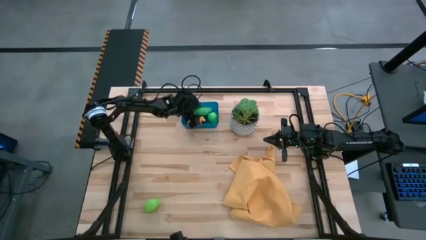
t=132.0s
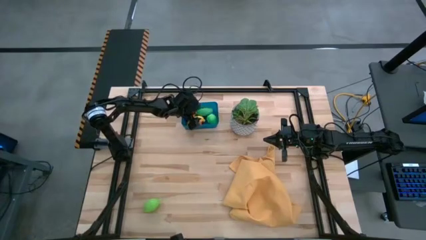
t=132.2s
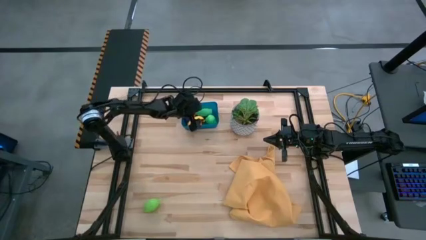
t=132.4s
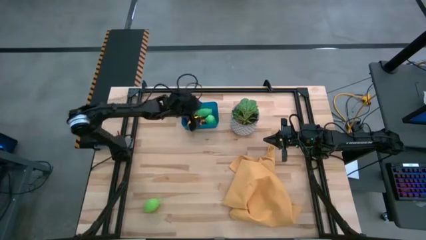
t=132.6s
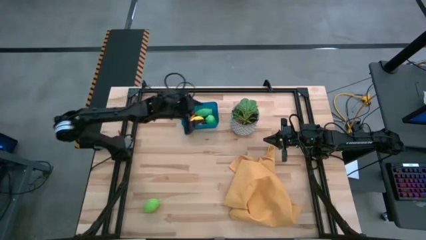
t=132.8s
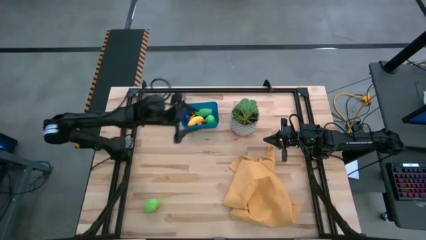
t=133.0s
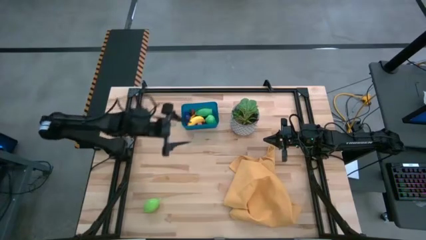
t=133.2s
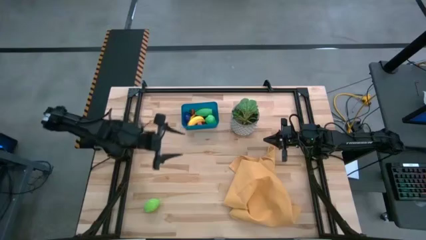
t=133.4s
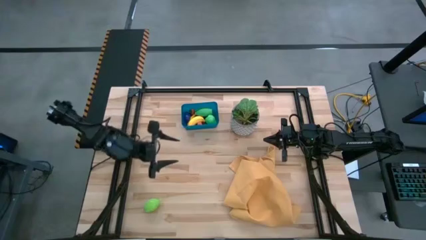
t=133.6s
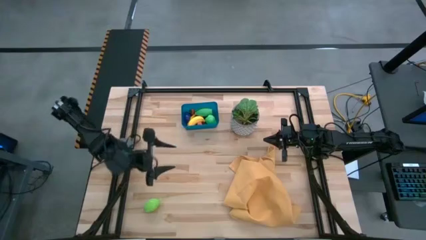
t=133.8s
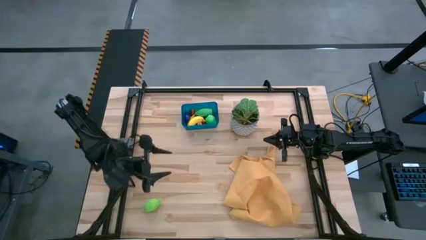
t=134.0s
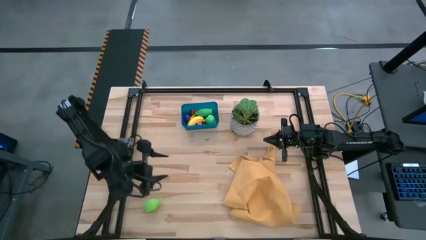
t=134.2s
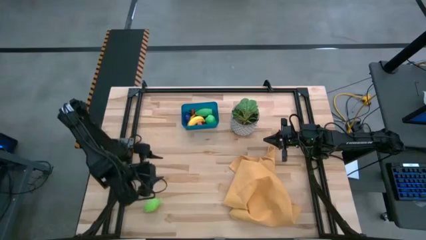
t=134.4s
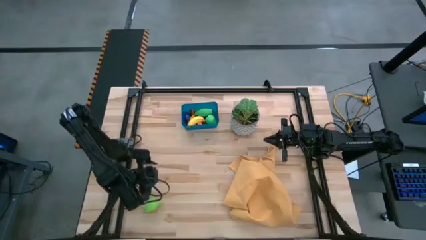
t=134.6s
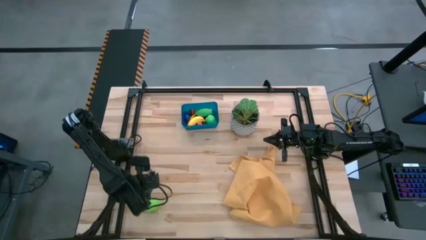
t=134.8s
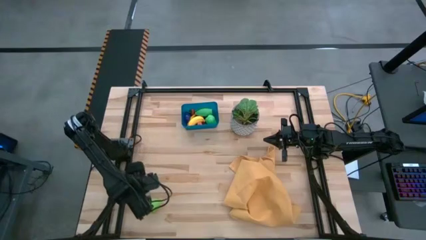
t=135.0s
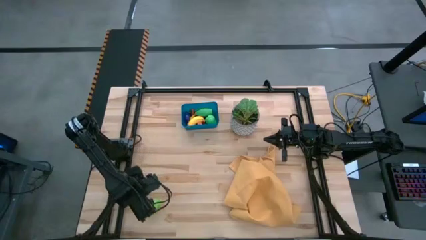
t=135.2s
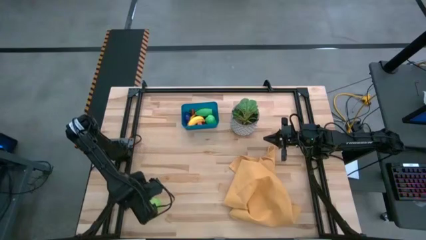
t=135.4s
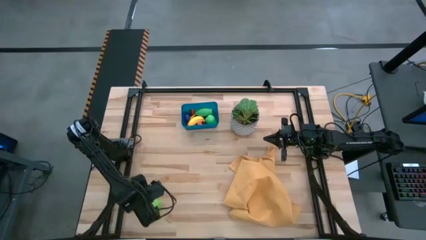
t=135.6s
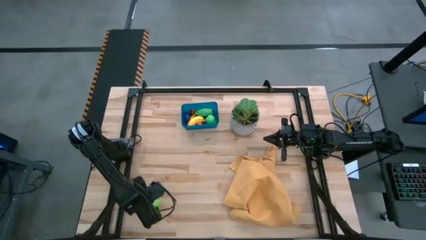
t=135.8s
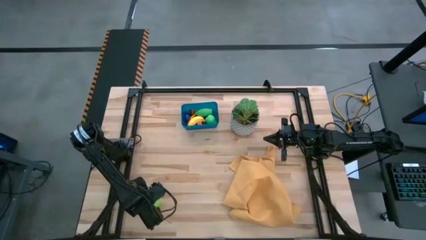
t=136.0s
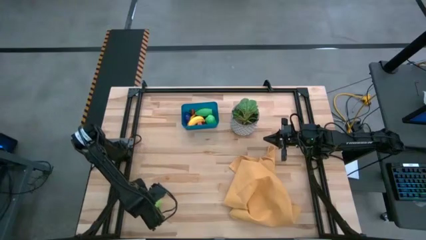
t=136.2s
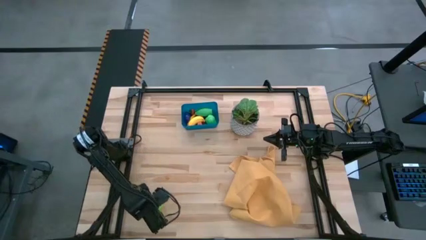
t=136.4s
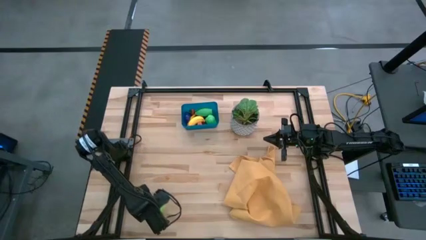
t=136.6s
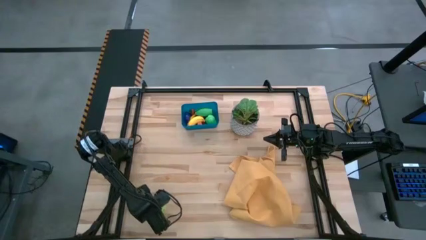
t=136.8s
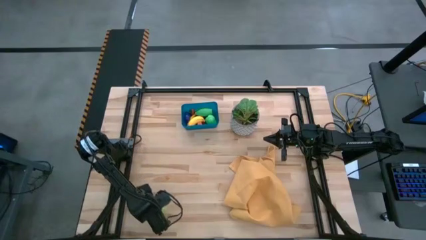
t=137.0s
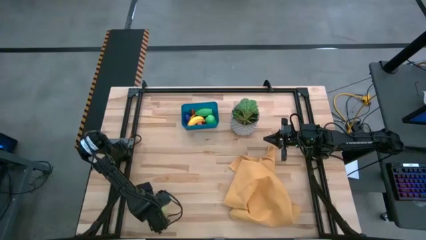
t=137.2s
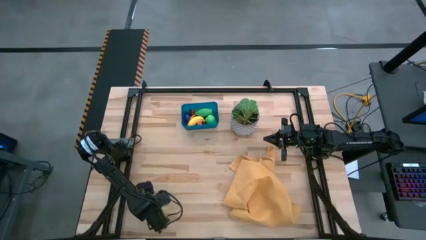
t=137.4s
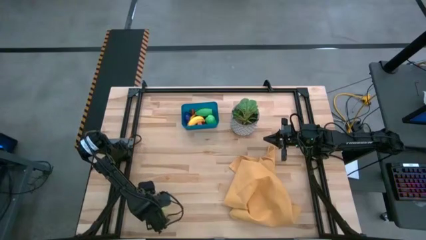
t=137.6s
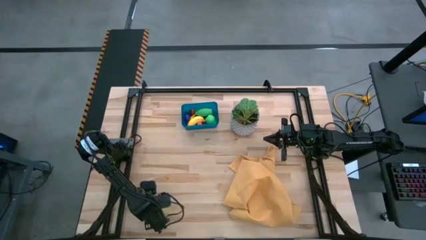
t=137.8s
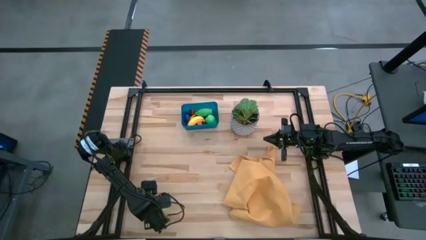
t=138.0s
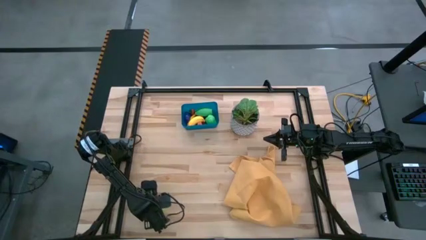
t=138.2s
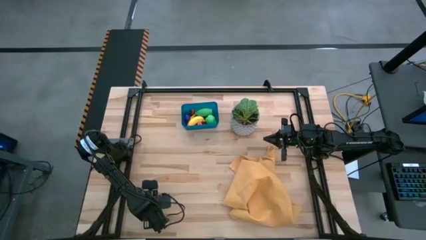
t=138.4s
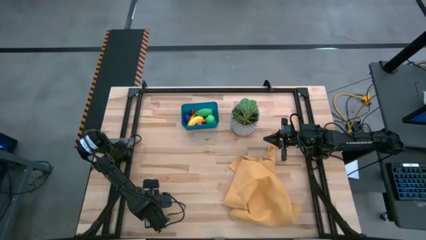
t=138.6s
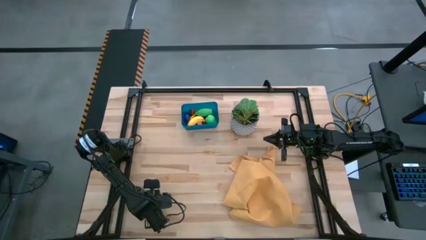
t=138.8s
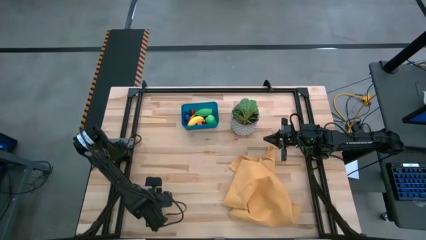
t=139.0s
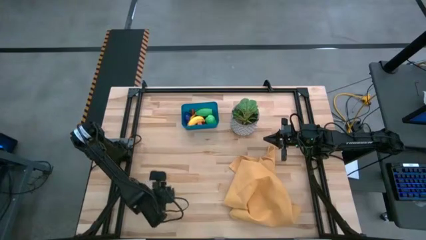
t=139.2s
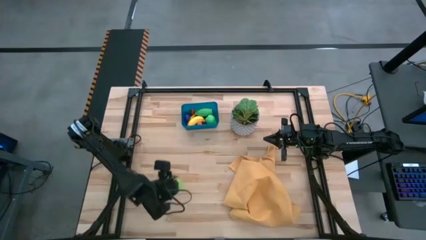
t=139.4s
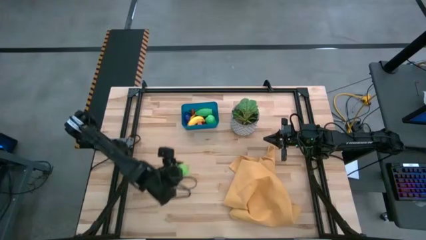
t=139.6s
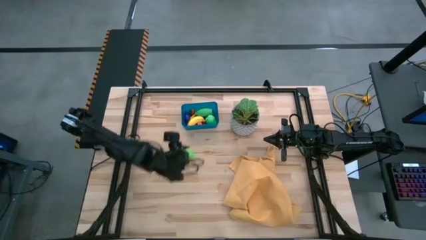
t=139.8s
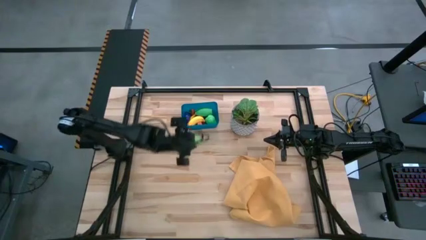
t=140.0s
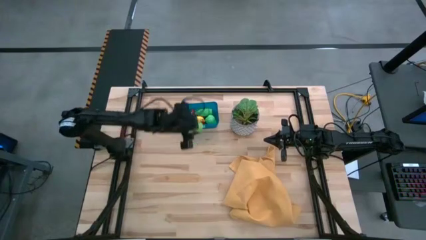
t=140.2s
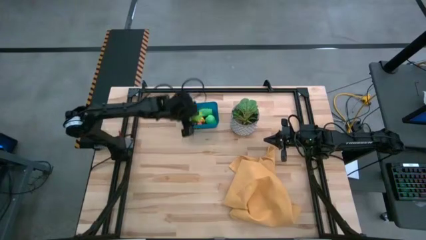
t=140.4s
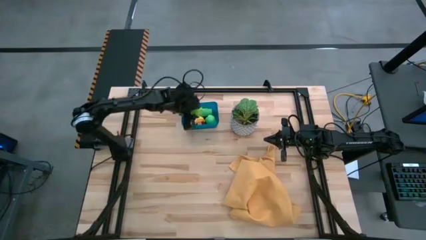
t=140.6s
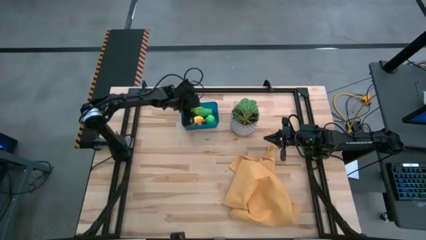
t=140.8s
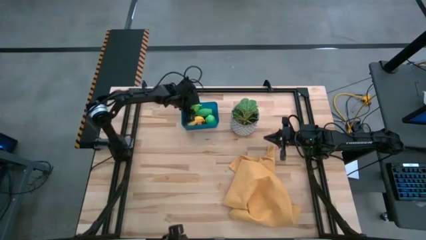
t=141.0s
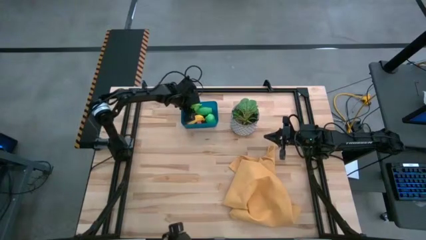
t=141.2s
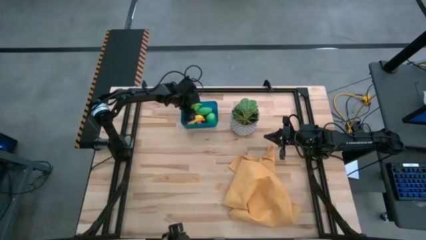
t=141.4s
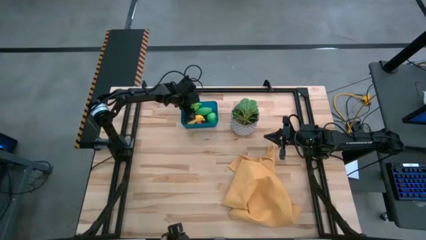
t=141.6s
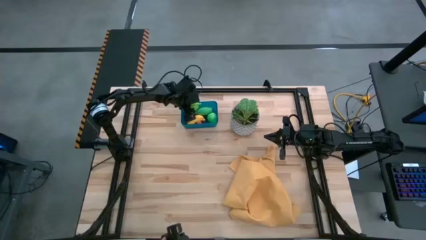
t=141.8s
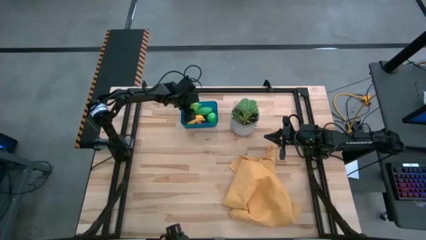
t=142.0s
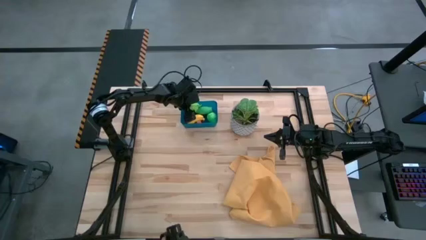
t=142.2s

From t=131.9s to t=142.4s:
Task: Pick and placing Produce into tupperware
Put the green melon into the blue bin

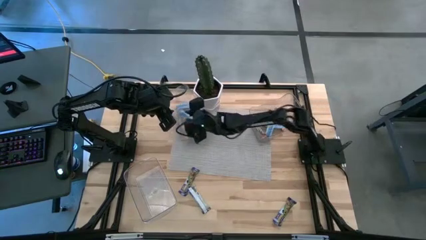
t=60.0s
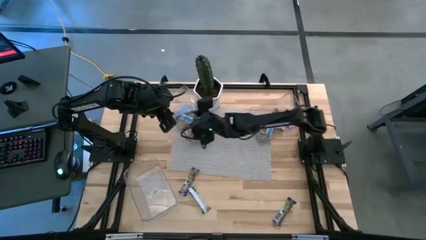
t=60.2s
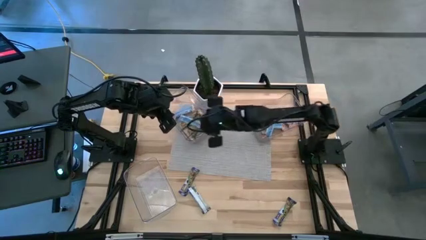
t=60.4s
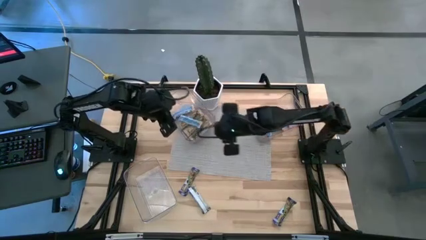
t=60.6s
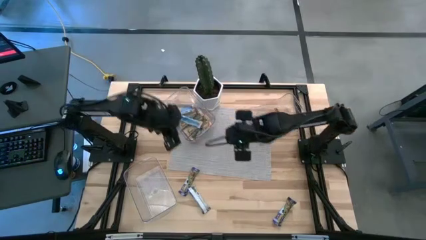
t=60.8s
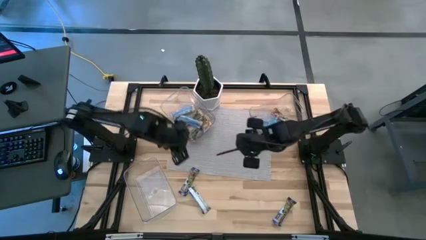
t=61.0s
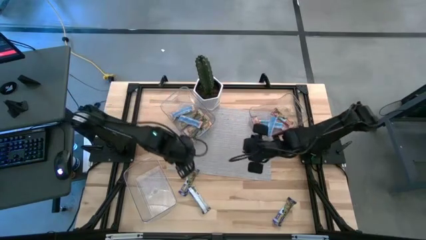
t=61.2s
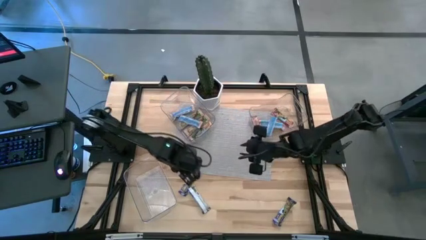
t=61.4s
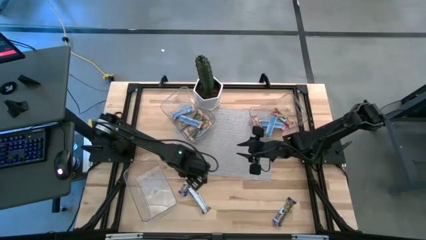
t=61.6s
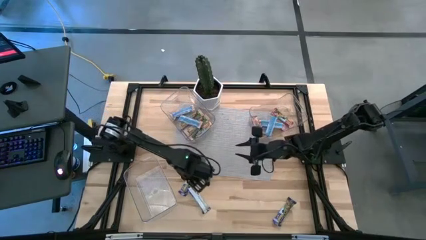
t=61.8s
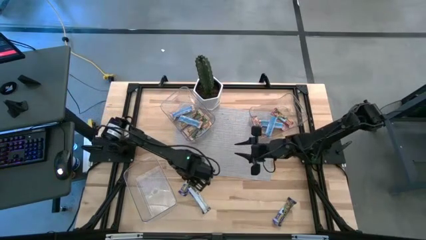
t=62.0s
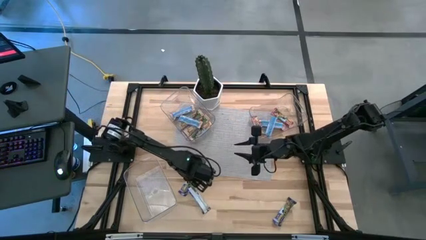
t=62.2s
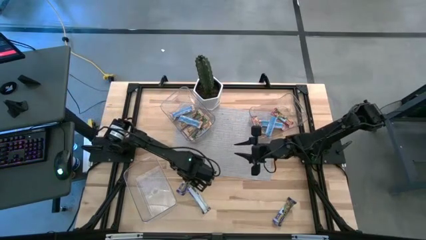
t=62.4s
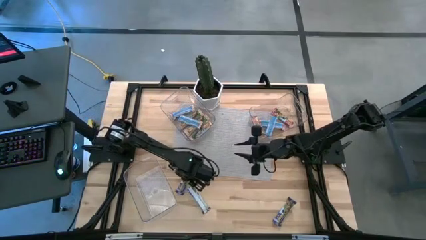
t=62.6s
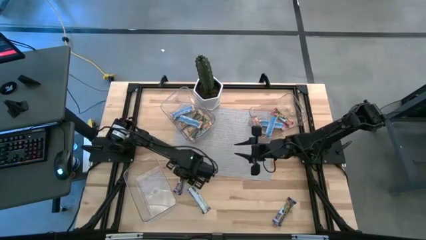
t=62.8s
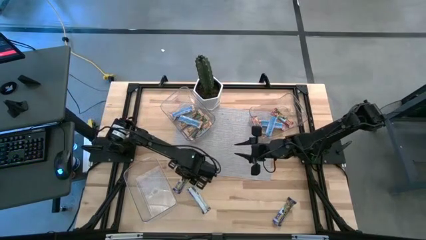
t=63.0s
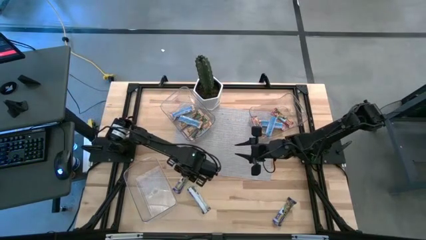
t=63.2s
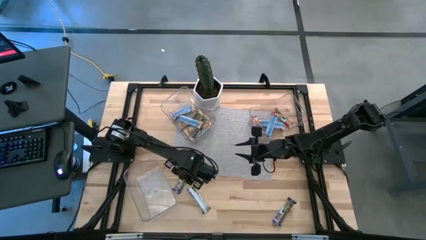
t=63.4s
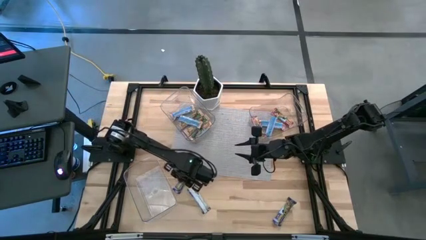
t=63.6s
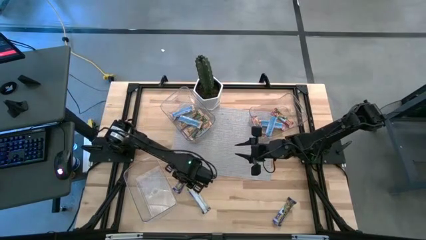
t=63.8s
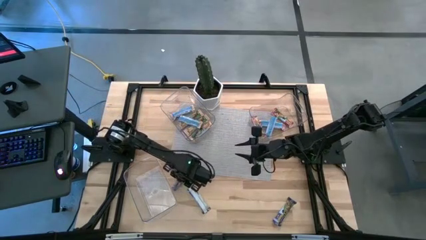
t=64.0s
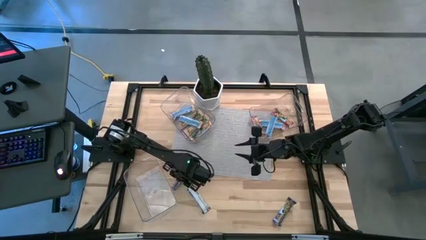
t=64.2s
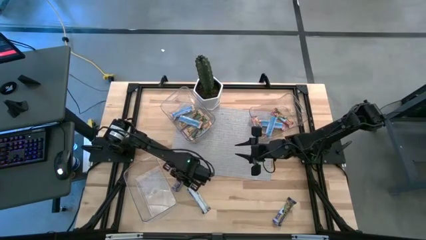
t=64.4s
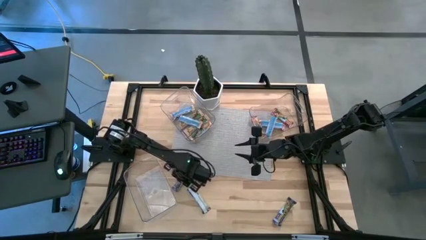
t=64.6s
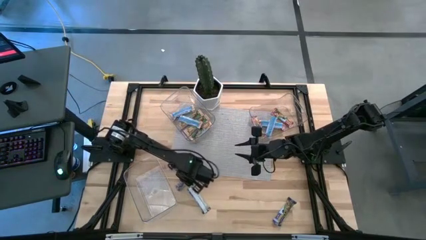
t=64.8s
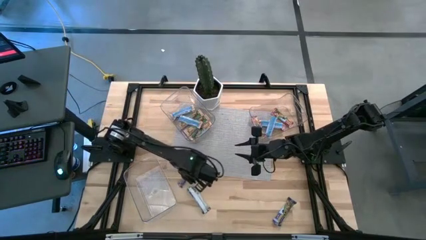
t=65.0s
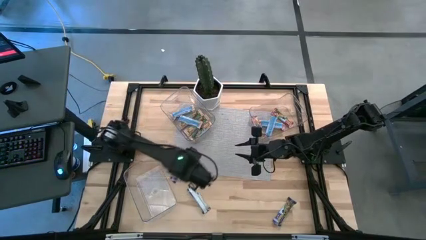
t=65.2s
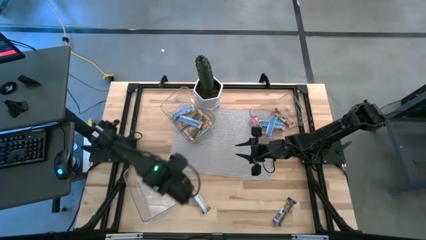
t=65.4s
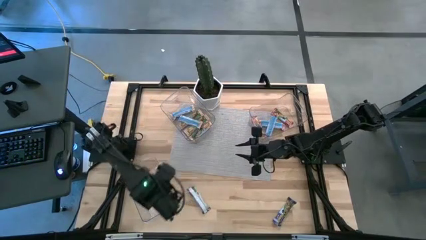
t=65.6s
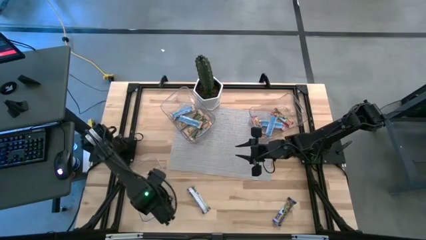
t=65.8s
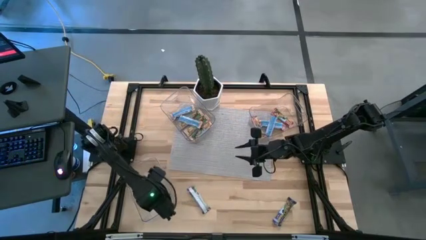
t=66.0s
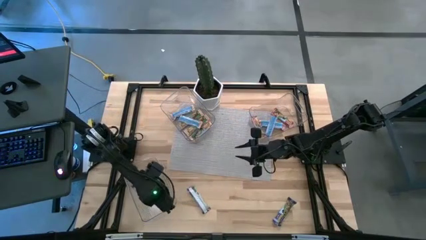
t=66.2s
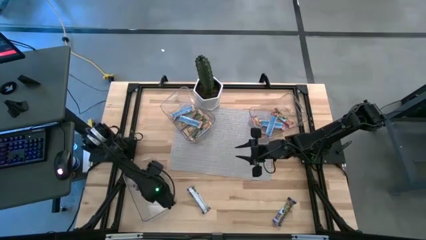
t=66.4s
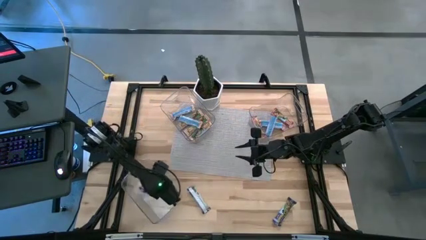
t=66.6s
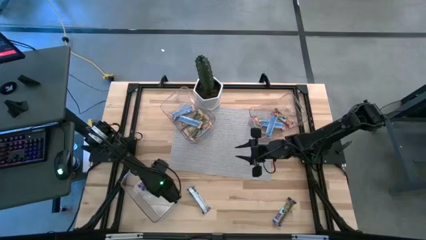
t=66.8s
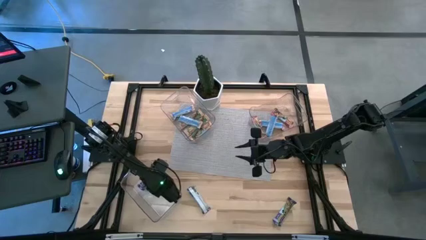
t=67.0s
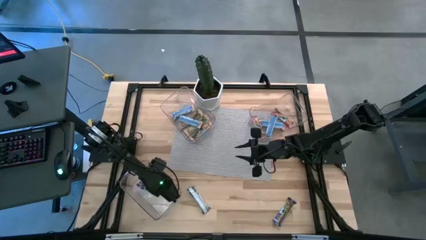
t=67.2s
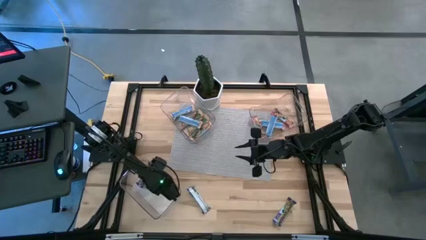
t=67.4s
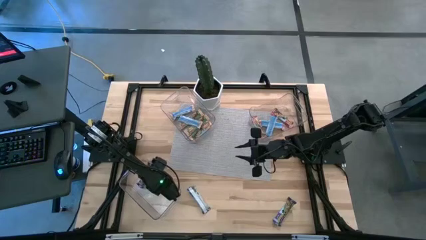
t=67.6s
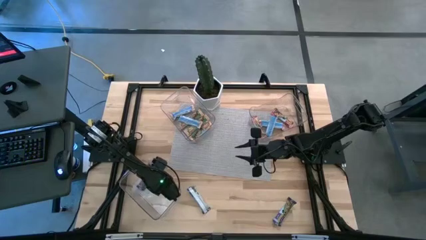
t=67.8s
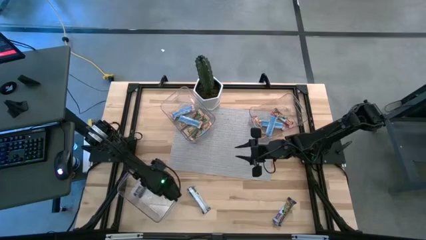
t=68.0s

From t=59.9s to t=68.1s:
Task: Pick and place Granola Bars by type
Put the blue granola bar into the bottom transparent bin
